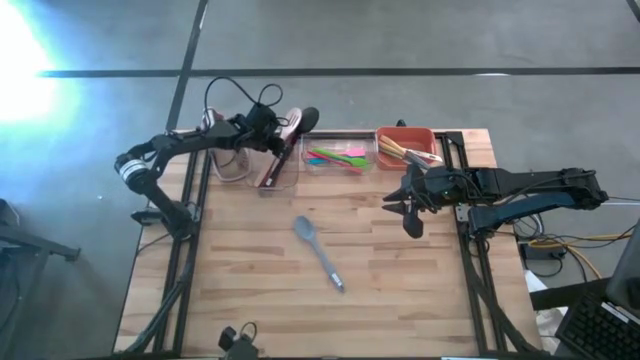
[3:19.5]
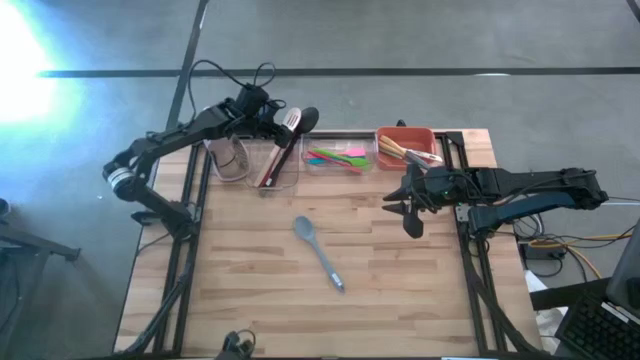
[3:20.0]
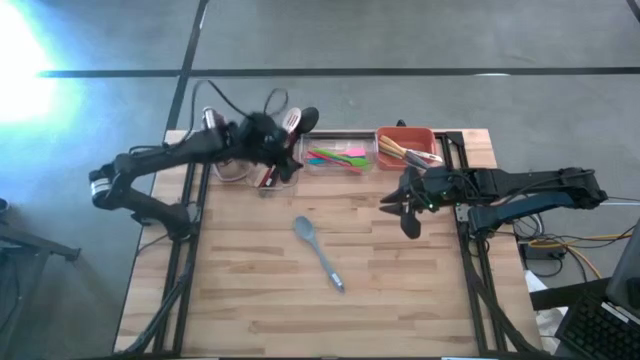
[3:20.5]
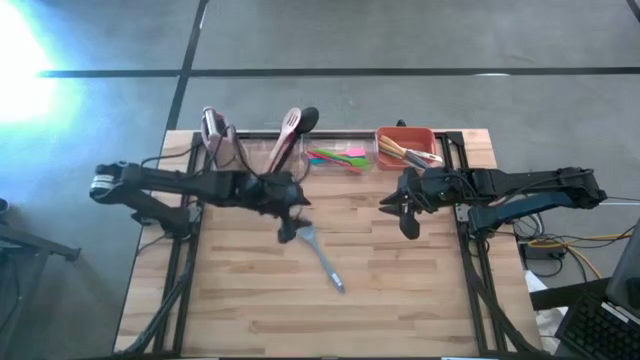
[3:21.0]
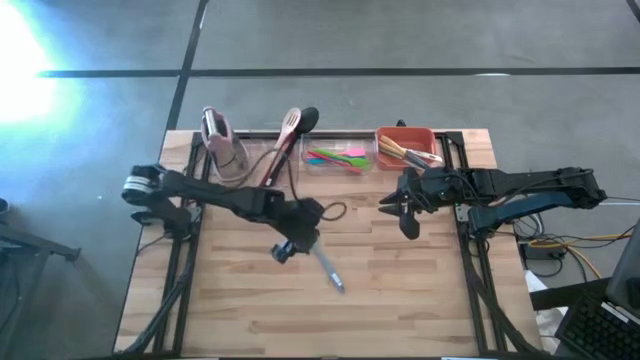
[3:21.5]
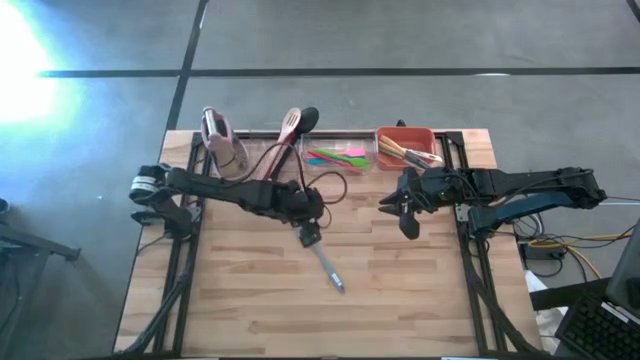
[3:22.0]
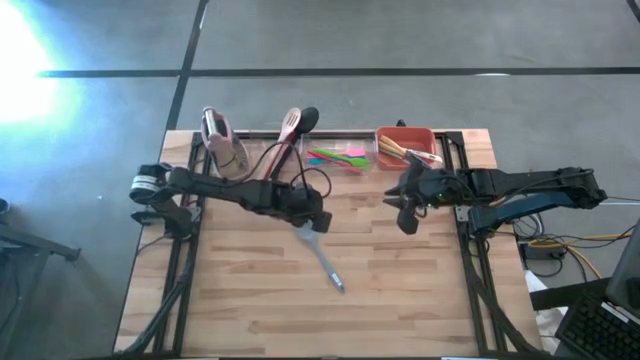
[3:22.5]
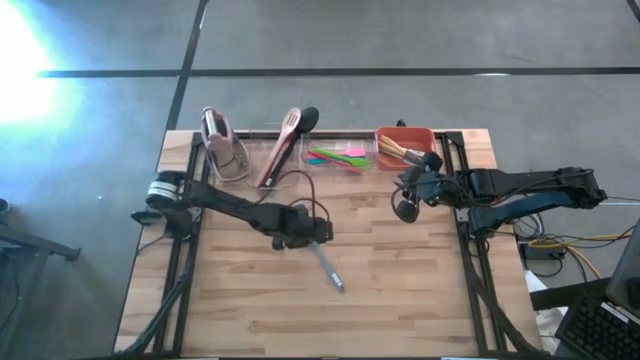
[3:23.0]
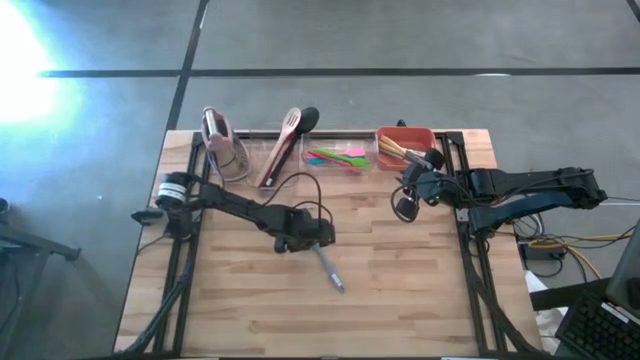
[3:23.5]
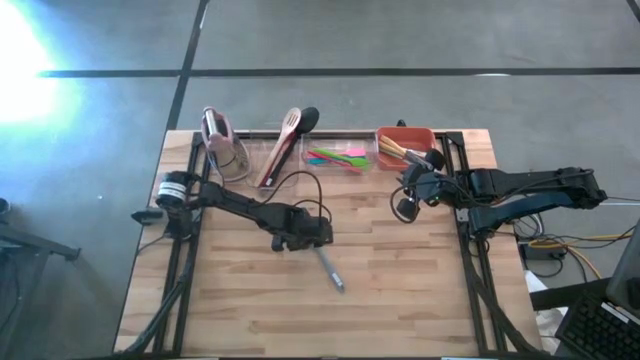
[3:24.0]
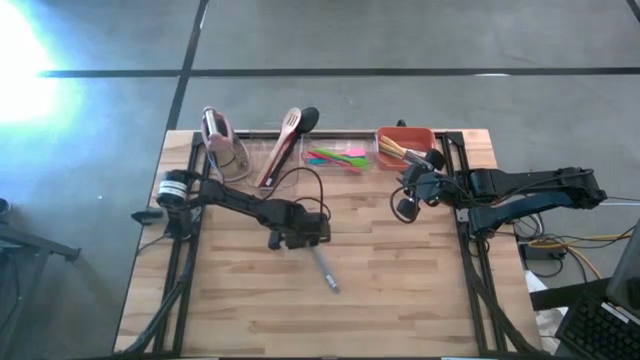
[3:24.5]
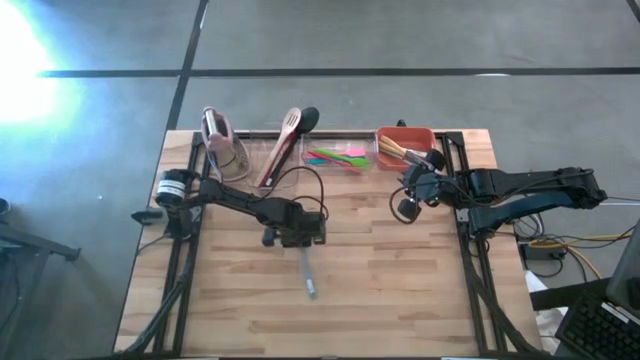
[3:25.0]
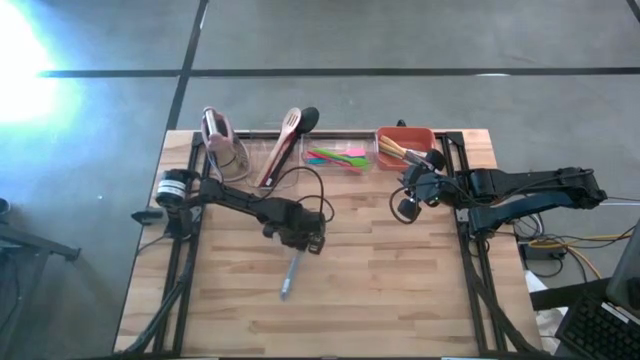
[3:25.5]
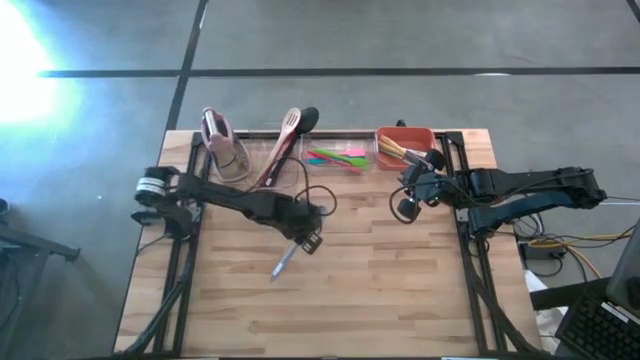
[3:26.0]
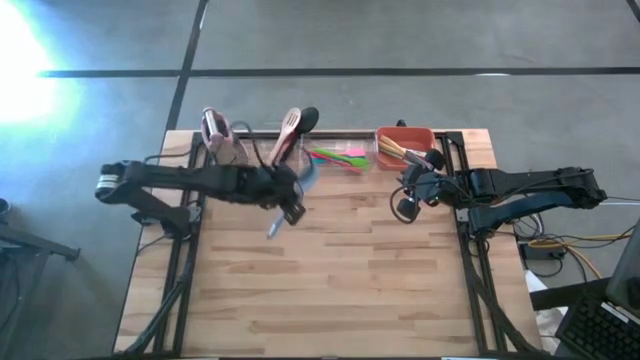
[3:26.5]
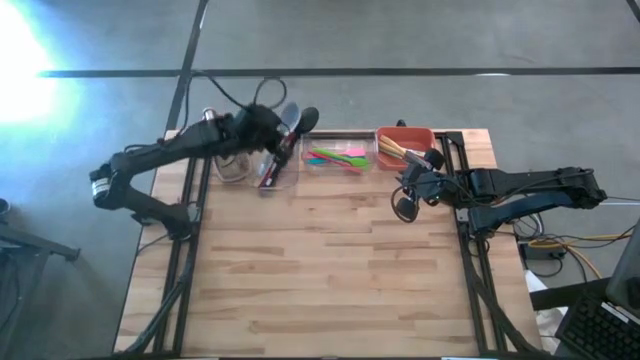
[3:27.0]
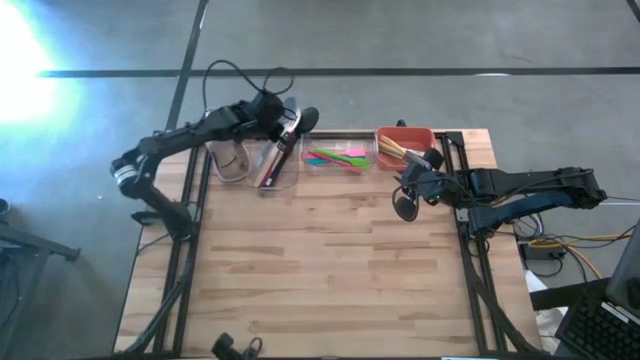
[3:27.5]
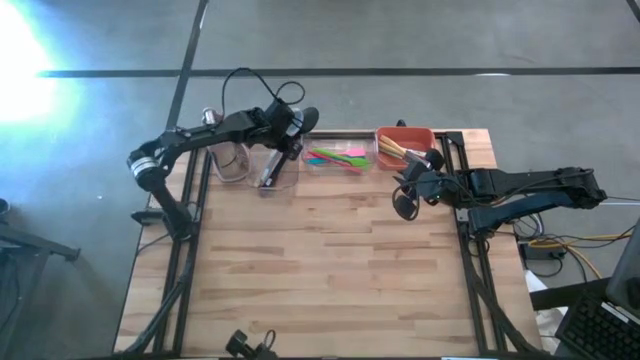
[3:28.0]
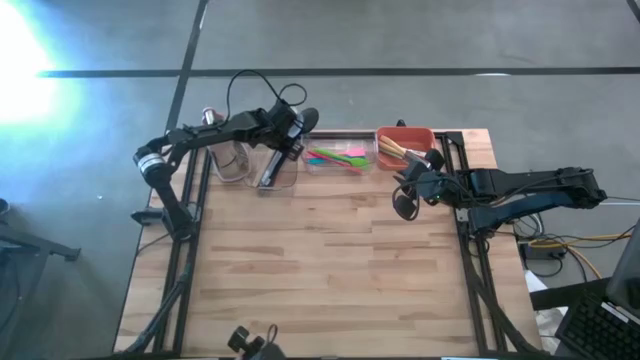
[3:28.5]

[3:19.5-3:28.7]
Task: Pick & Place Kitchen Items
Put the gray serving spoon into the left transparent bin

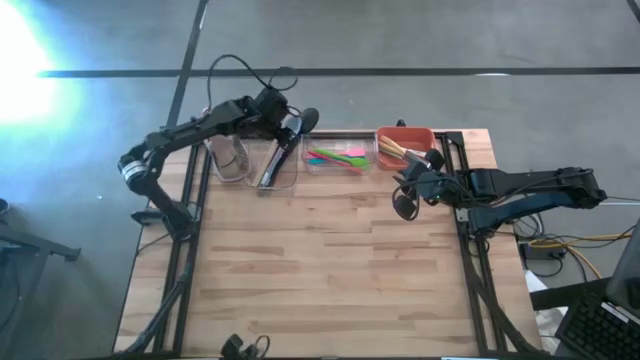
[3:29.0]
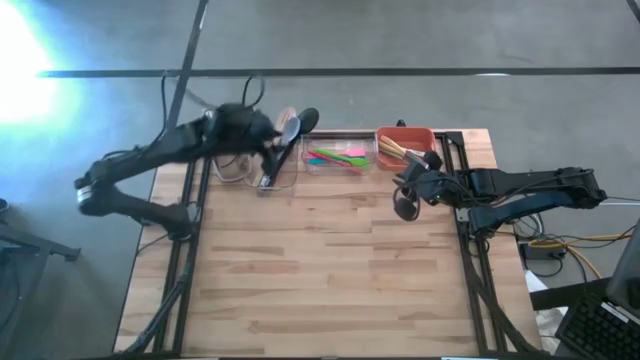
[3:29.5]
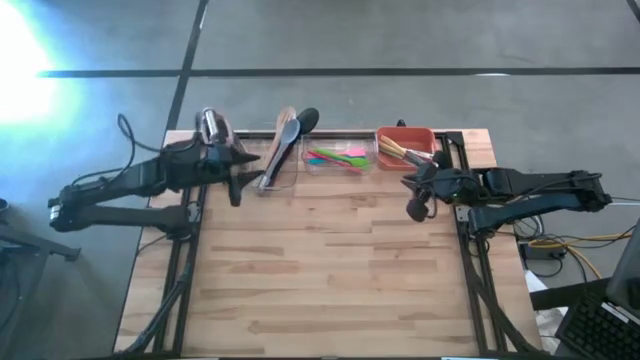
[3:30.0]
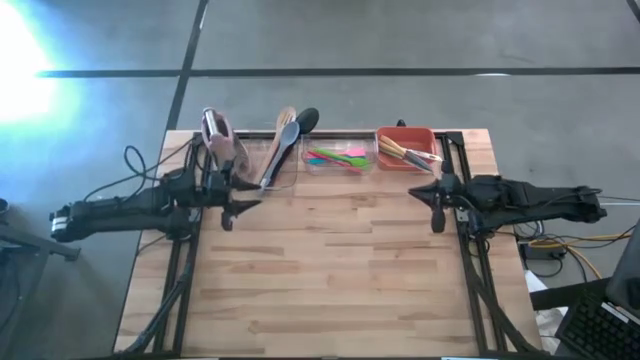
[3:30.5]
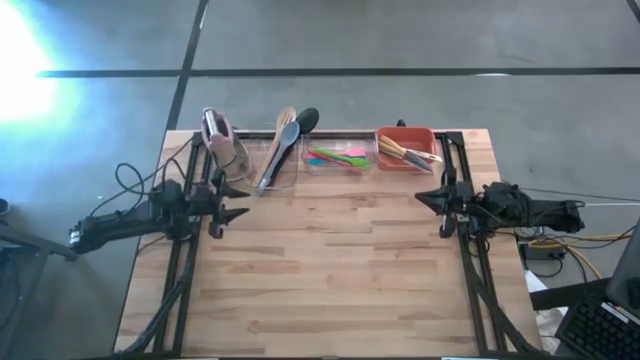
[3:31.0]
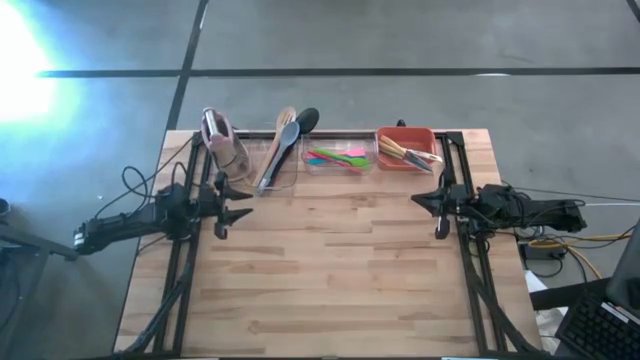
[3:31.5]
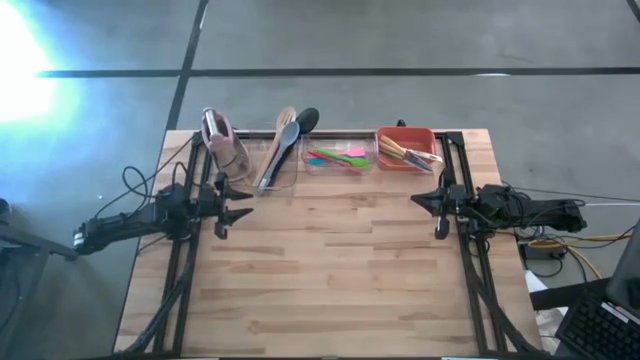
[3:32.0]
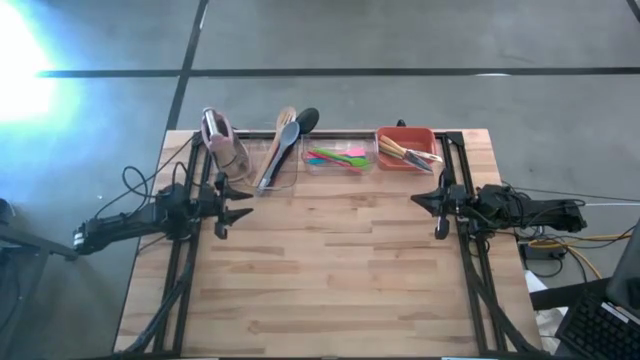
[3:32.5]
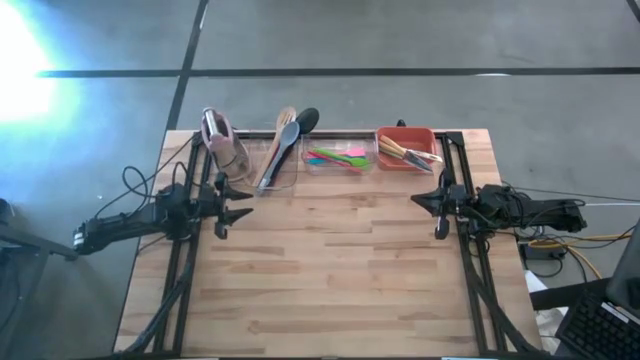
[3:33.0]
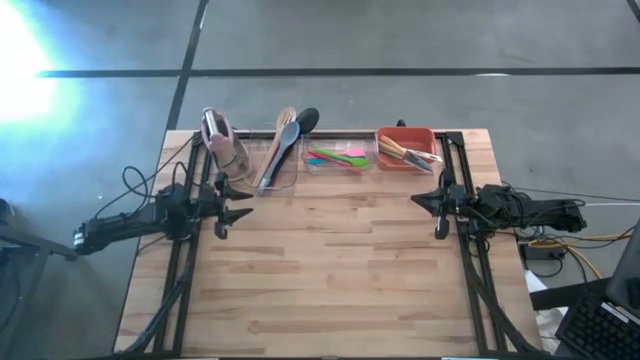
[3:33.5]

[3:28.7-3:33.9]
Return to Home Position

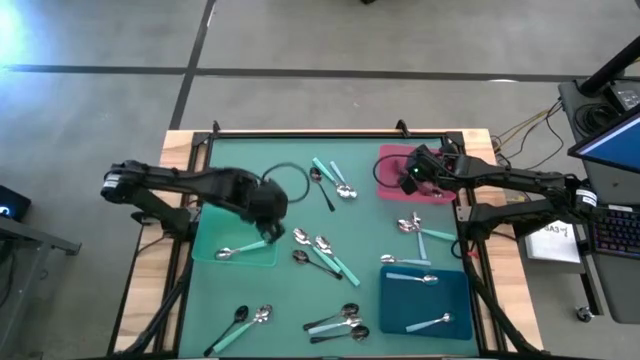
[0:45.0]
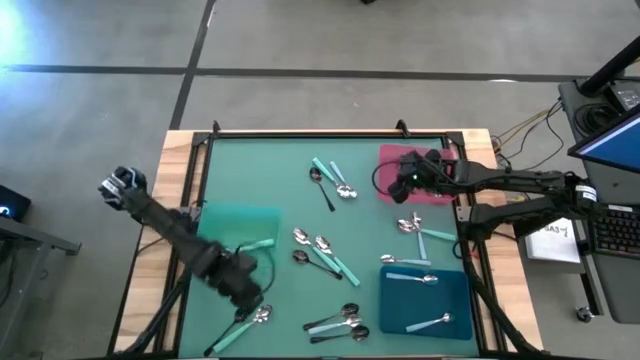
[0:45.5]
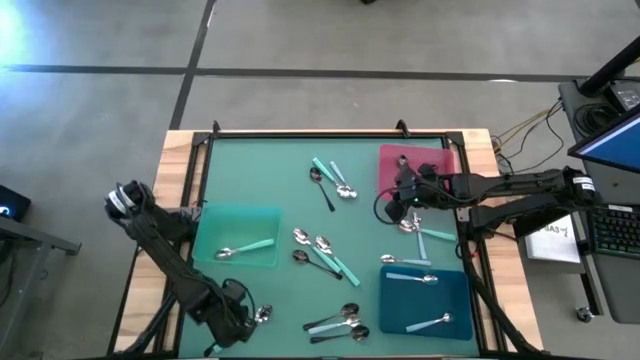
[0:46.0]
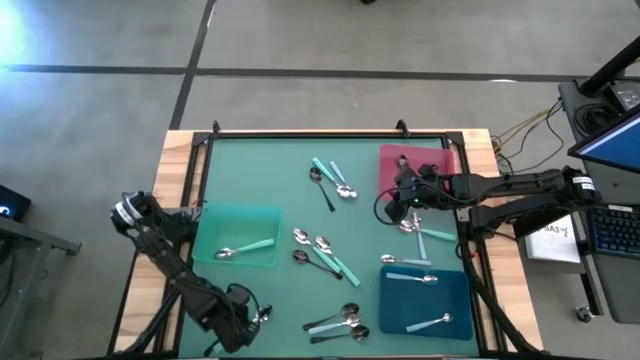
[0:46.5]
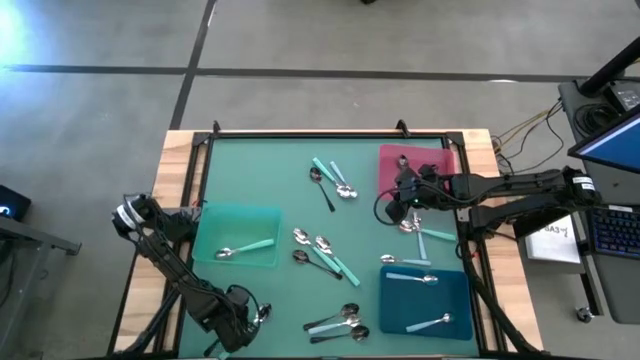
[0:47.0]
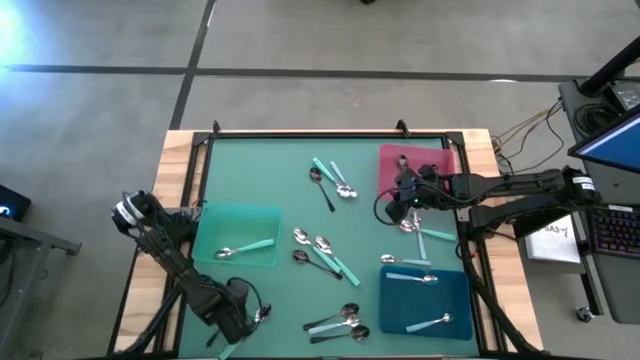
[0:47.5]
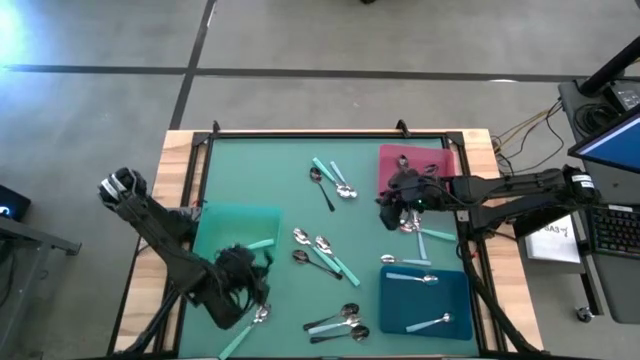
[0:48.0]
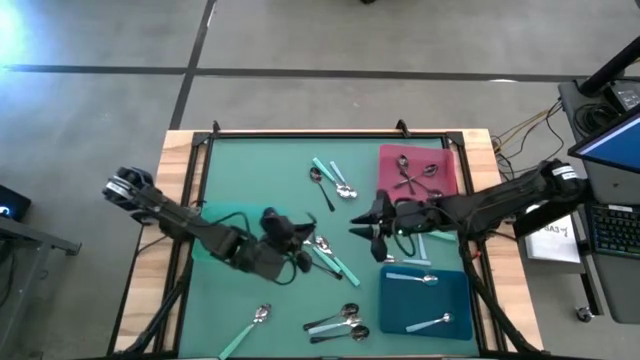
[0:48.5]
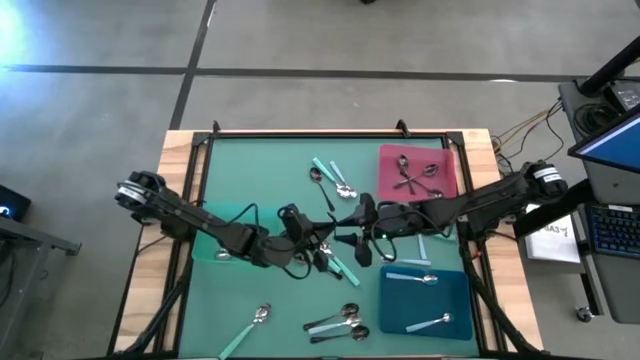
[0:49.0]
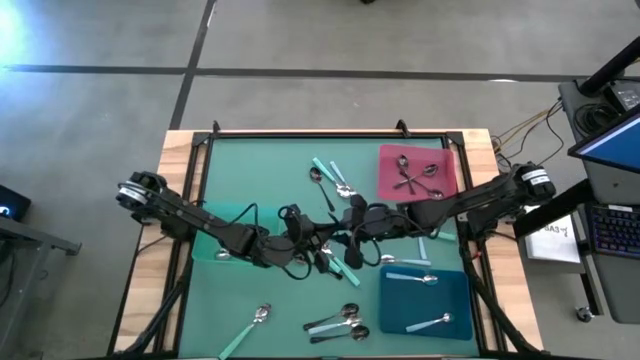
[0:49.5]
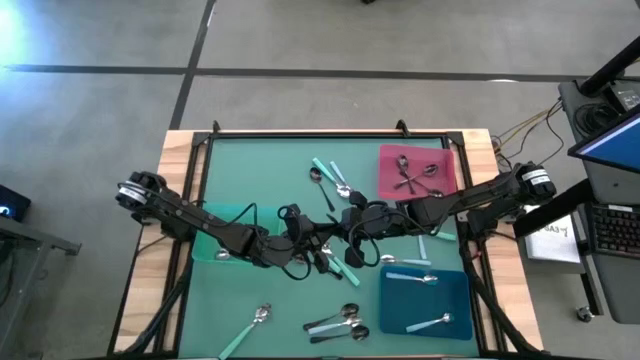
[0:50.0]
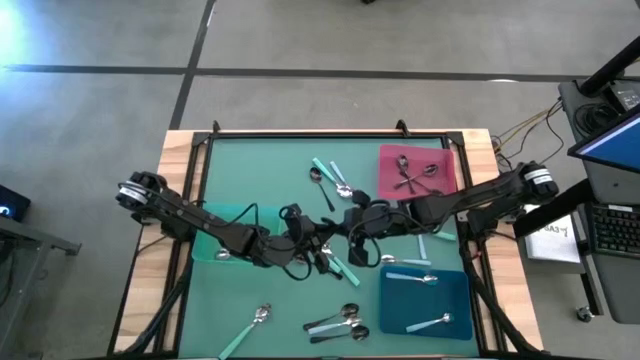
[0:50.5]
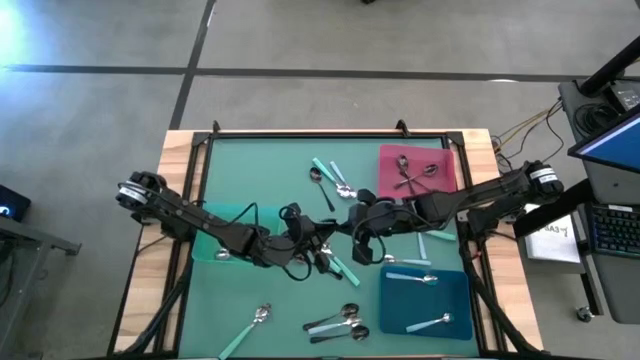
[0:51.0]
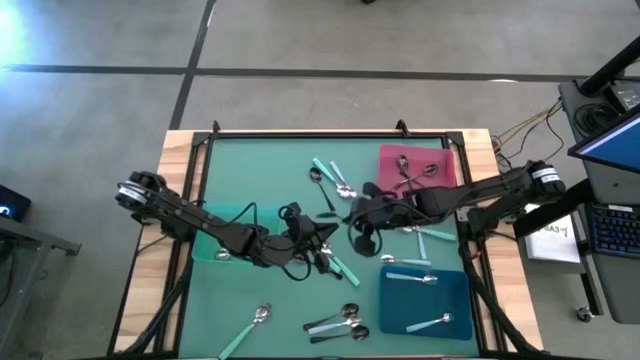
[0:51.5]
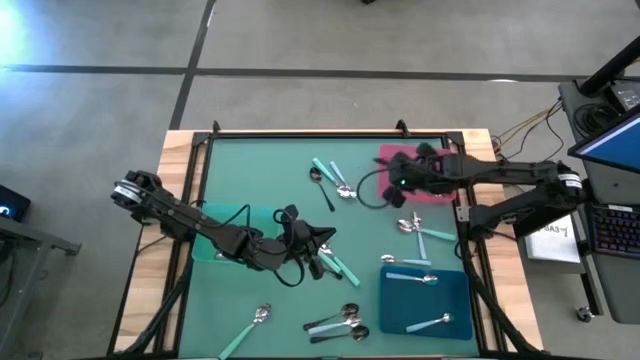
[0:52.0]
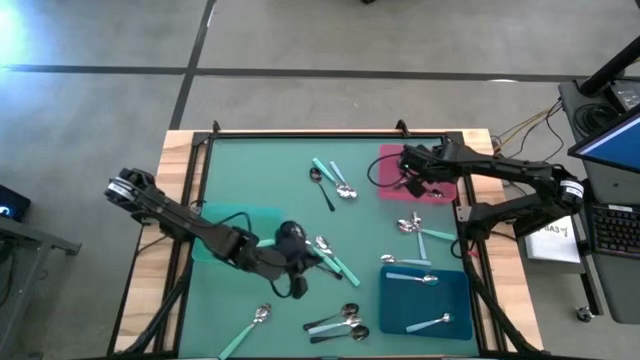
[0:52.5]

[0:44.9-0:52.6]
Task: Sort silverware by color (type)
Put the black spoon into the red bin
